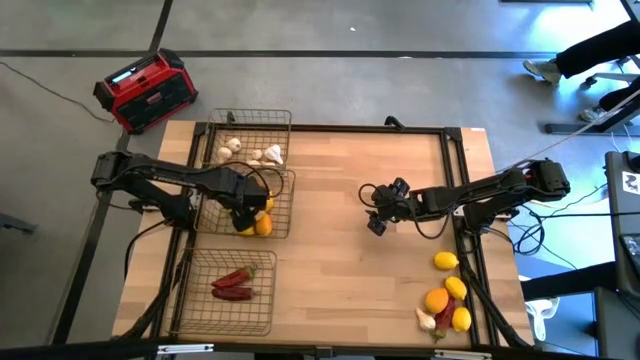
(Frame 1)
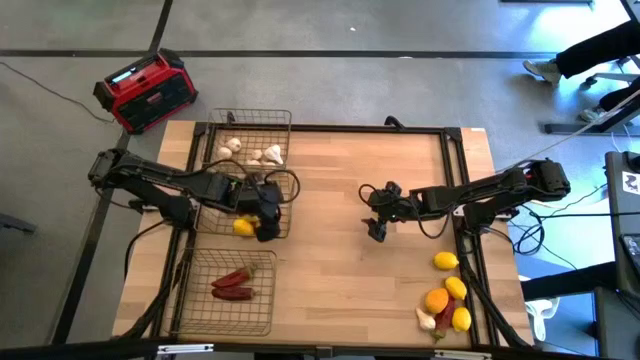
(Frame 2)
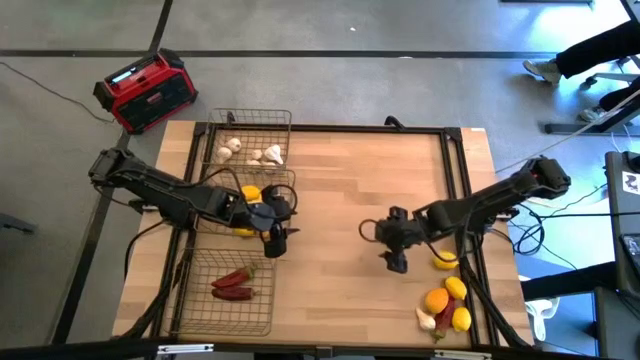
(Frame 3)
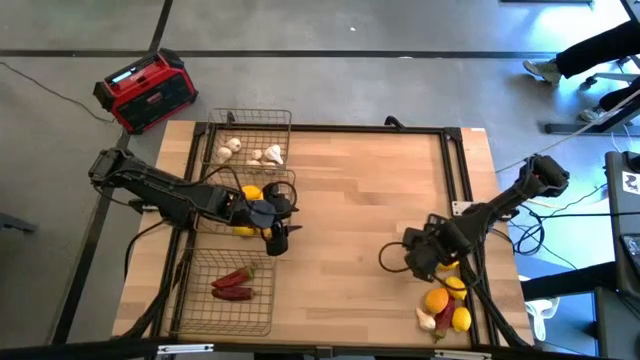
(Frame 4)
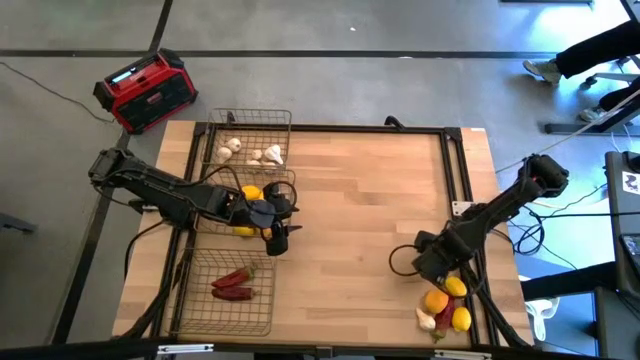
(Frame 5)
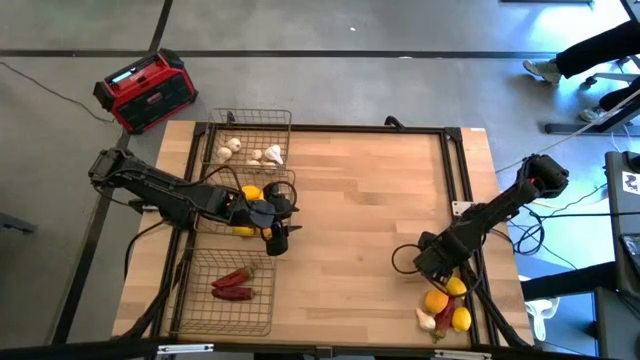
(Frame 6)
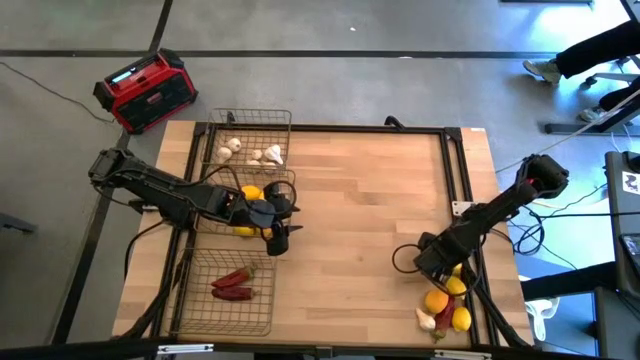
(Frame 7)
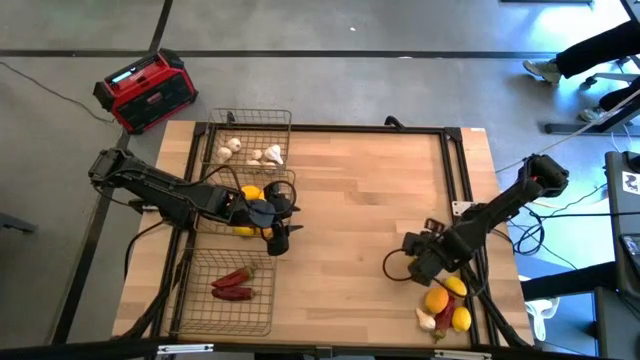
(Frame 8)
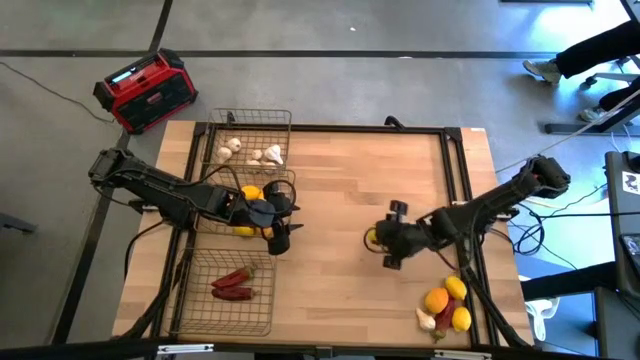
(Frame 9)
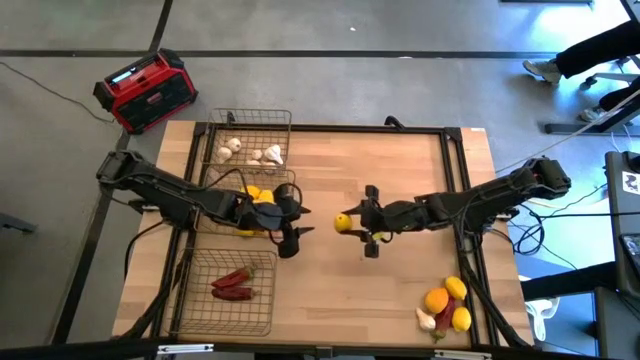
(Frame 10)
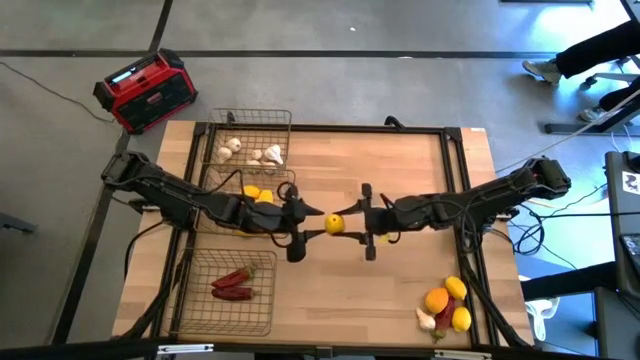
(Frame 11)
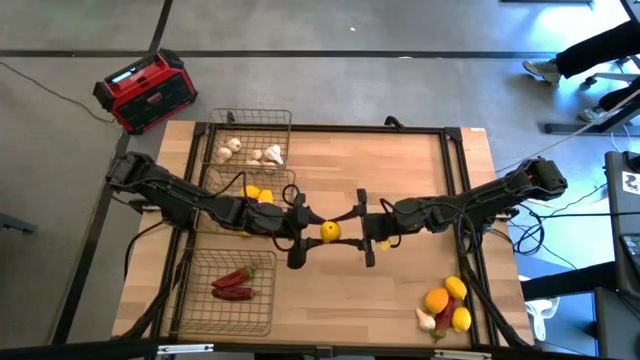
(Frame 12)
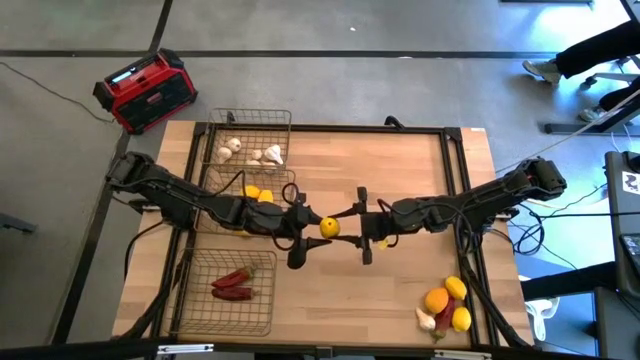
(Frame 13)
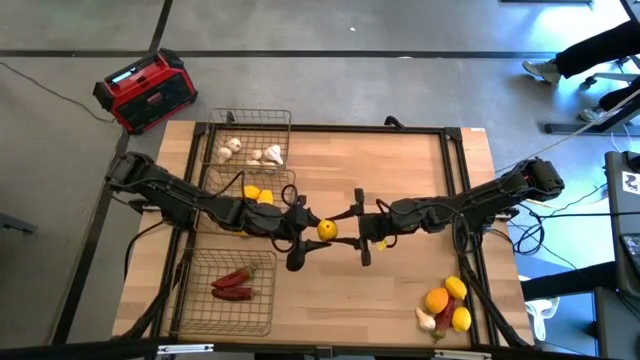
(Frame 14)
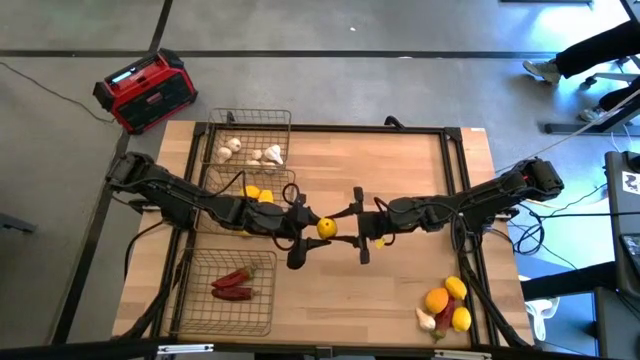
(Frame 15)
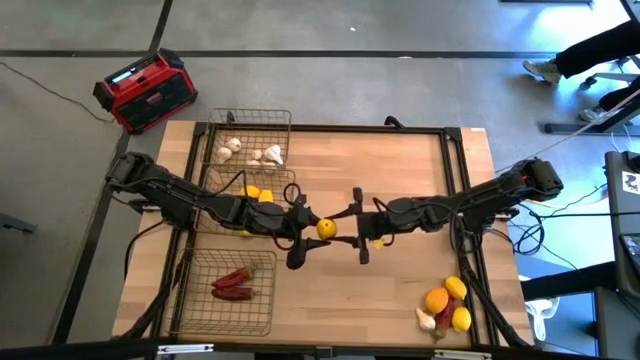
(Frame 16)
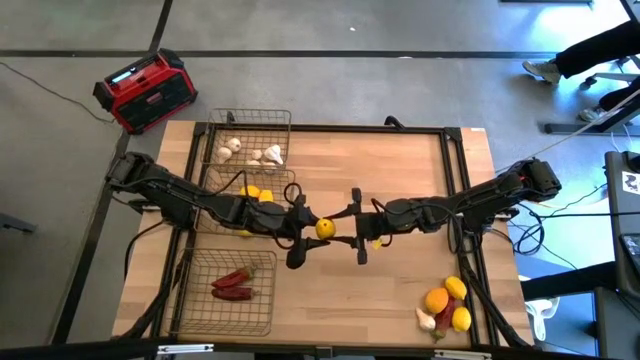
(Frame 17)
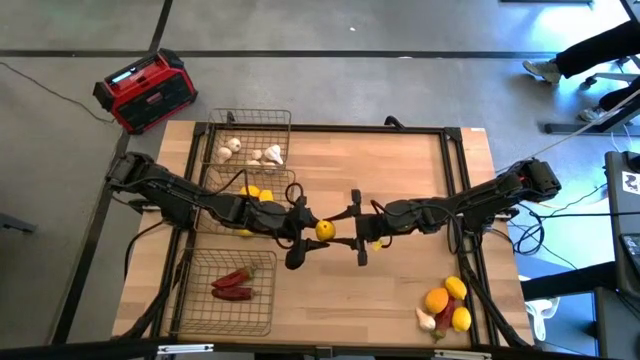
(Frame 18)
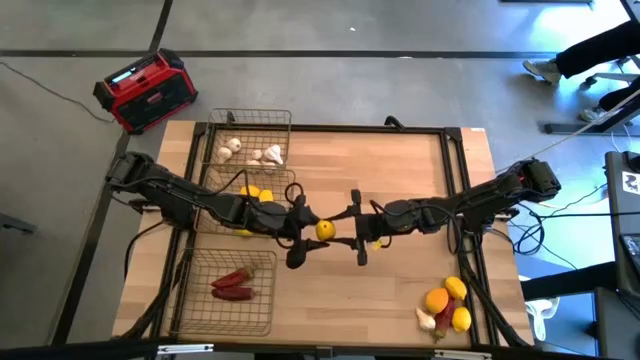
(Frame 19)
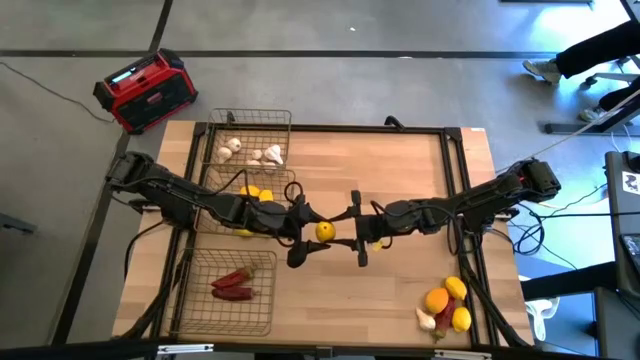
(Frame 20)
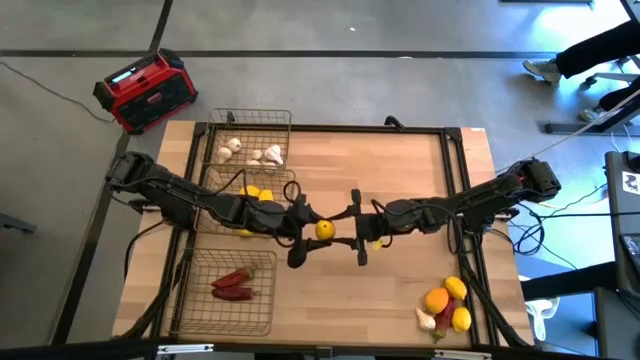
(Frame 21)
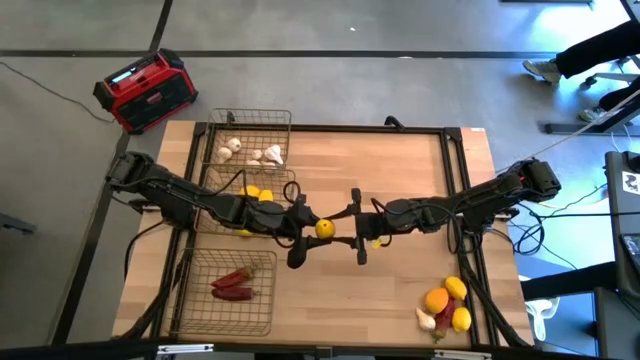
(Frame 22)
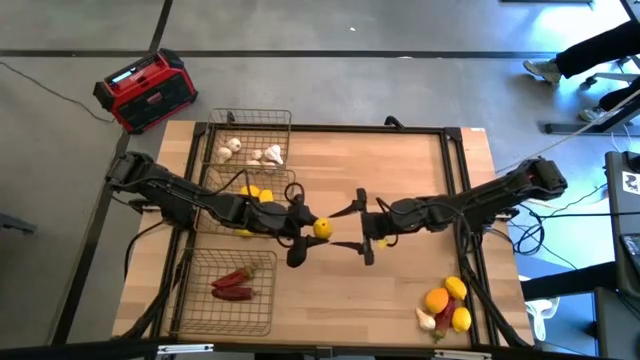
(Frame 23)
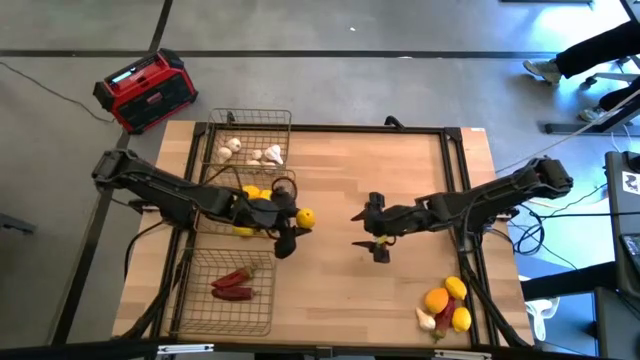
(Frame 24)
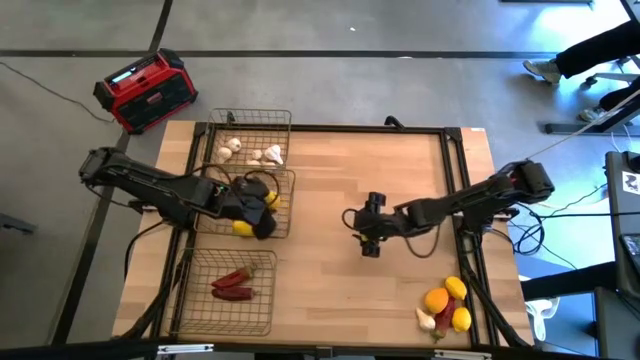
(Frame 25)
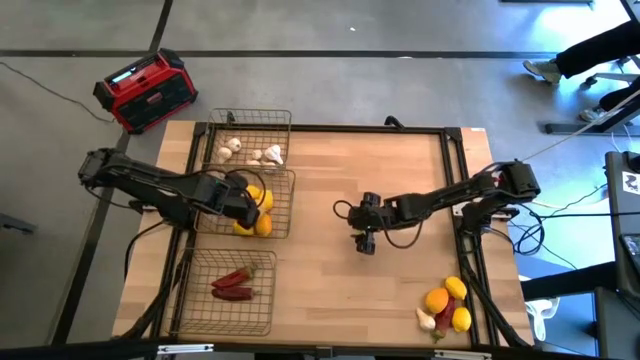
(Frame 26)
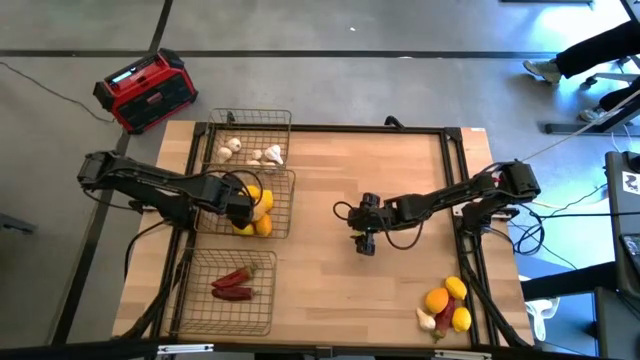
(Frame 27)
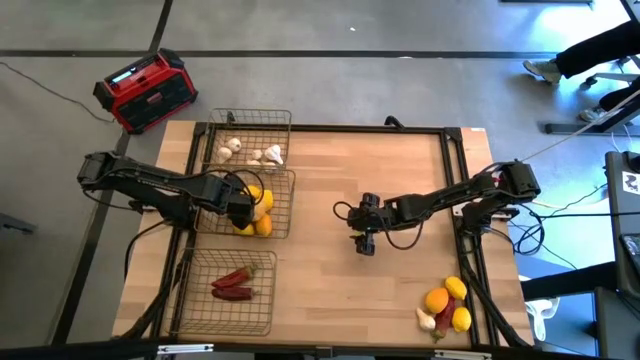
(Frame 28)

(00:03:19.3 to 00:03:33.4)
Task: Sort produce into baskets
Put the lemon in the middle wire basket

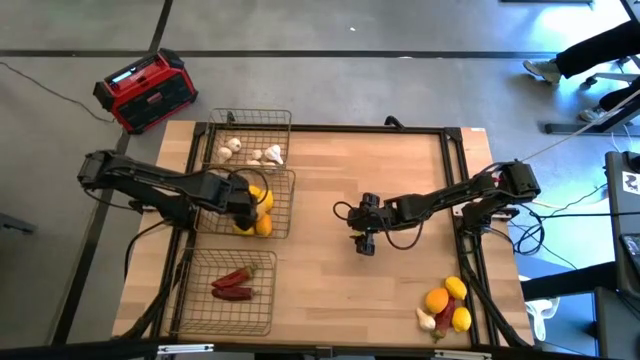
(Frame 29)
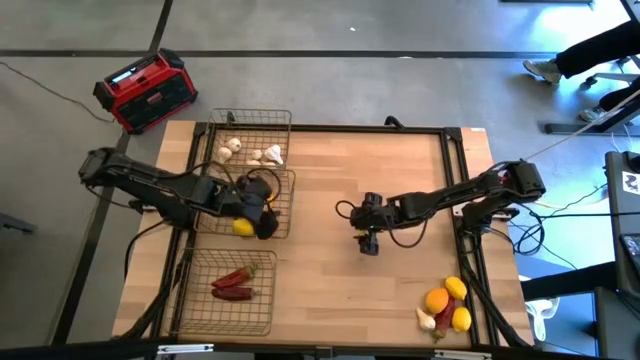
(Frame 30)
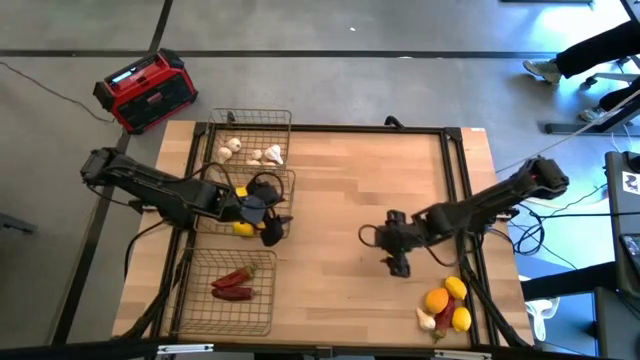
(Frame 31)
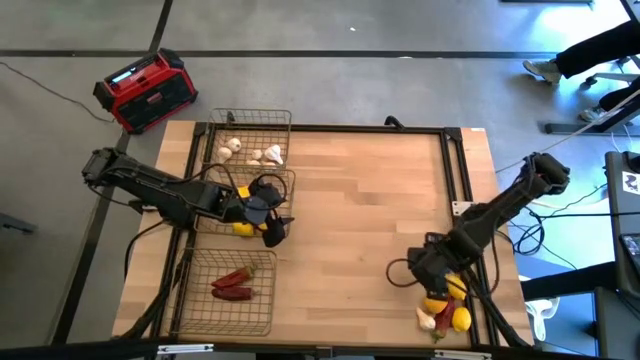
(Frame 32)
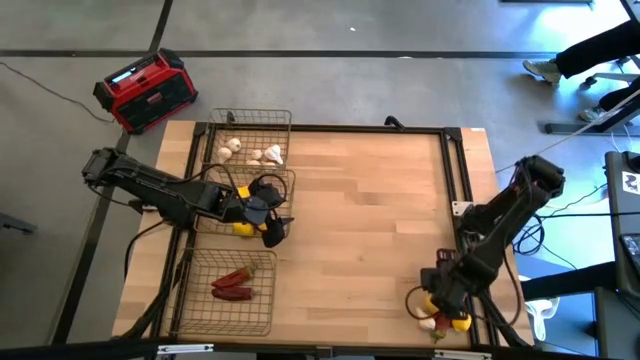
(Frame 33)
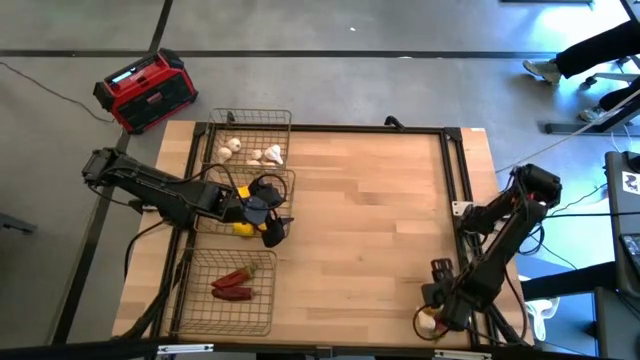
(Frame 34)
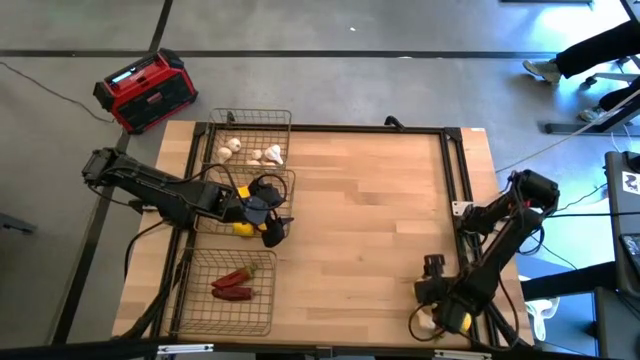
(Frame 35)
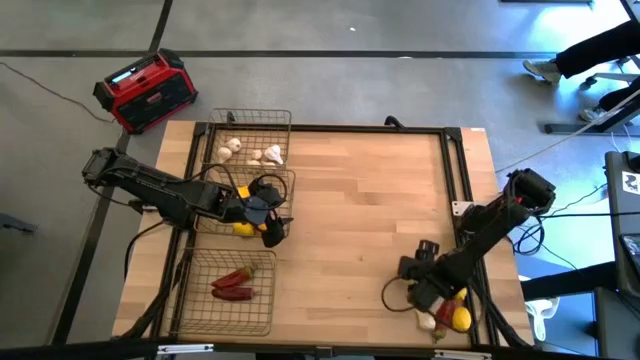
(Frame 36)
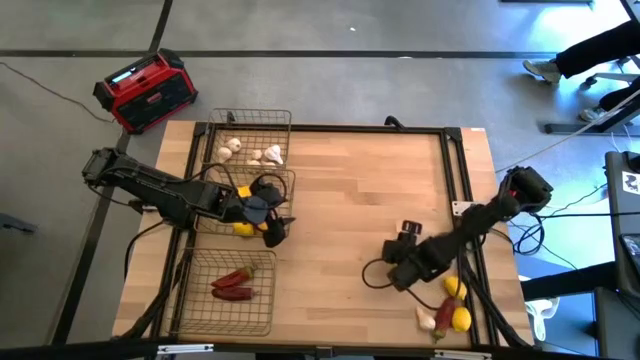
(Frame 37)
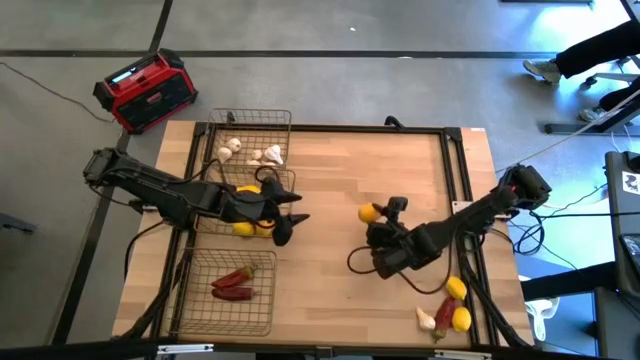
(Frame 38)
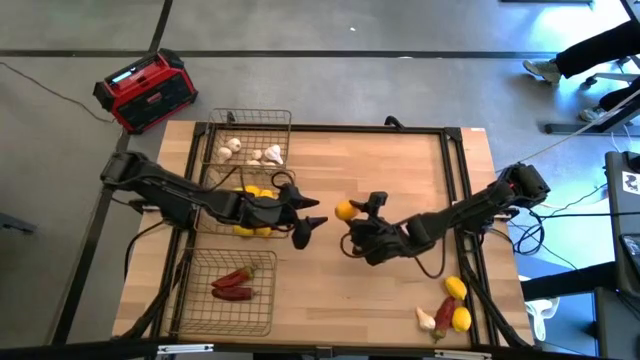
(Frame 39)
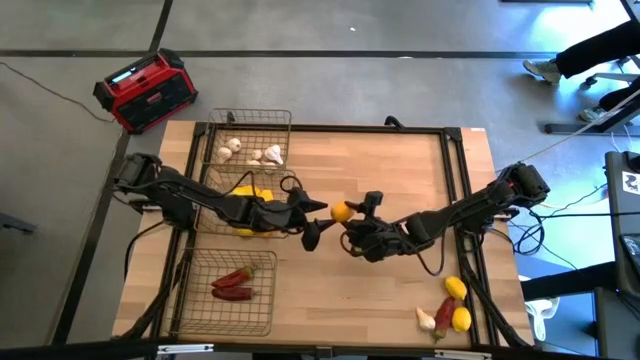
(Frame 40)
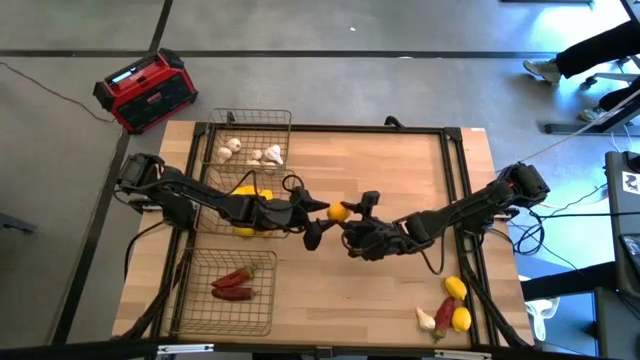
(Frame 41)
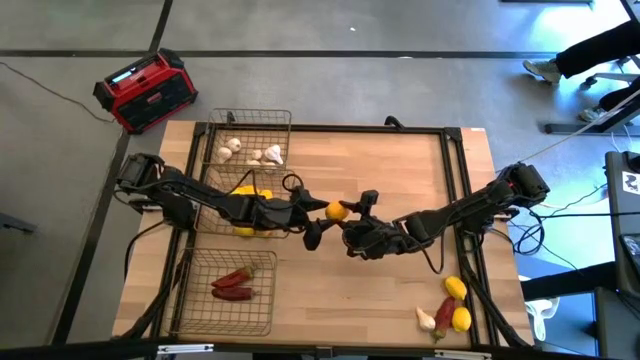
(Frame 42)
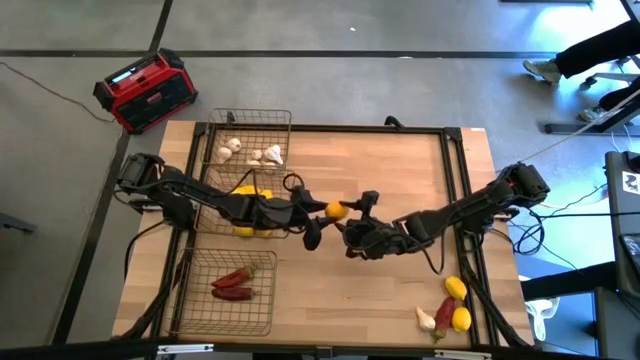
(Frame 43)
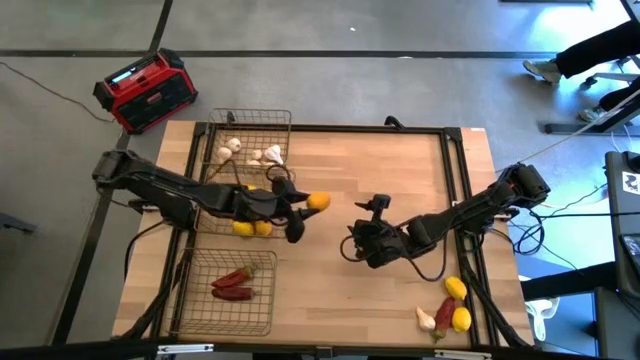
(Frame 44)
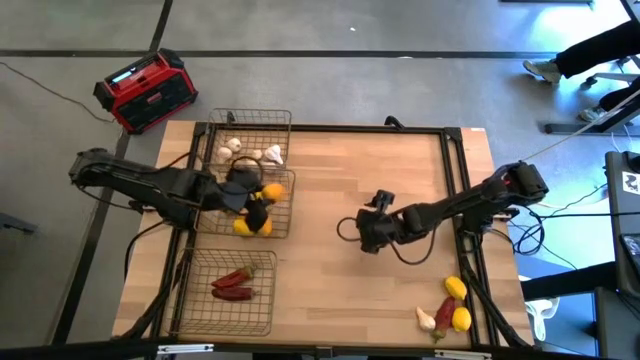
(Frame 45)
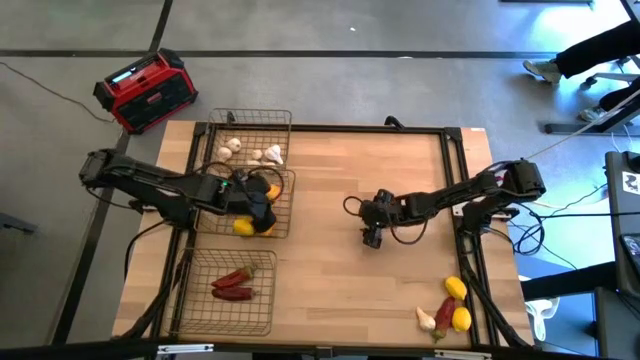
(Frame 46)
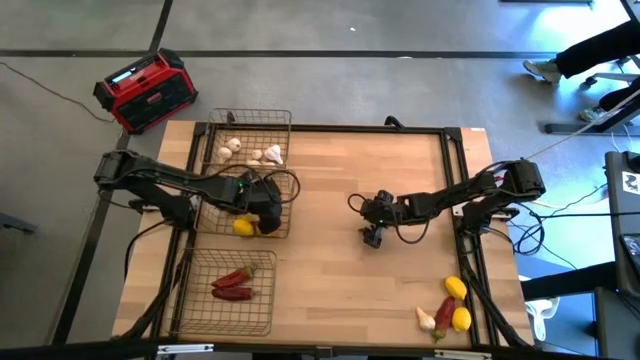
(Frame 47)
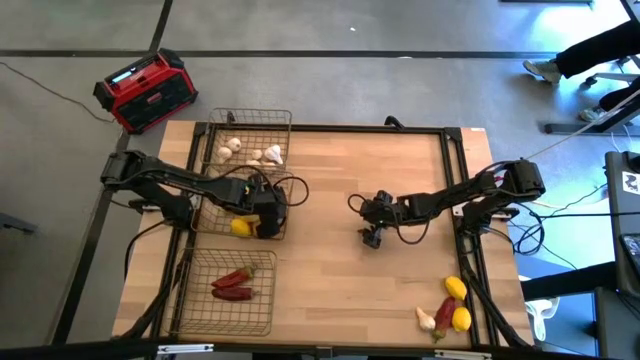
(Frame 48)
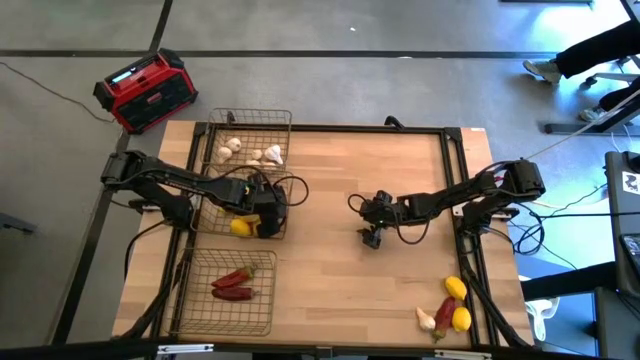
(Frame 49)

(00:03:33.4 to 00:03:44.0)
Put the lemon in the middle wire basket
